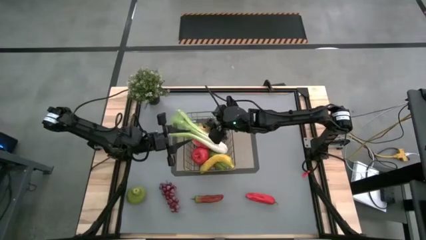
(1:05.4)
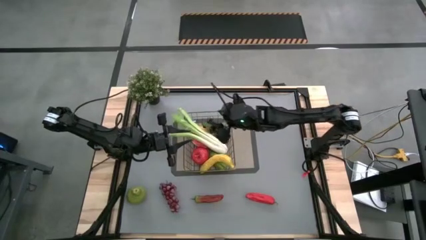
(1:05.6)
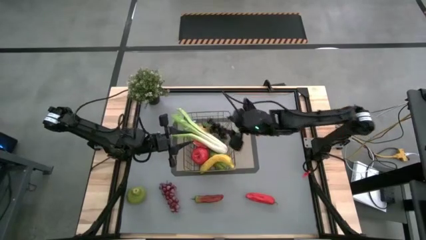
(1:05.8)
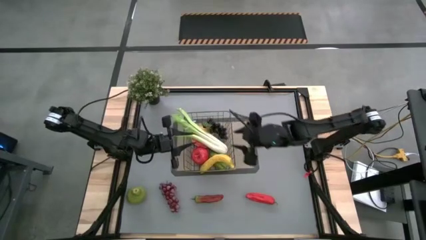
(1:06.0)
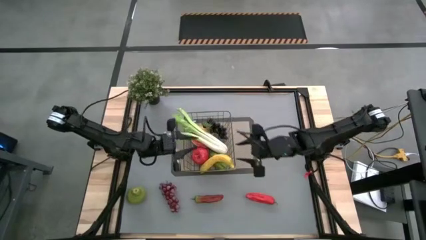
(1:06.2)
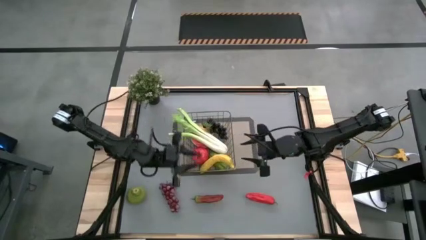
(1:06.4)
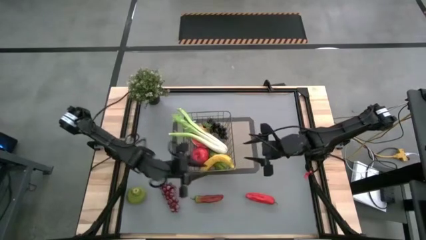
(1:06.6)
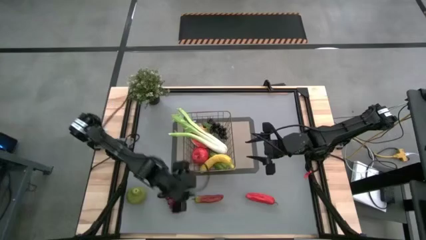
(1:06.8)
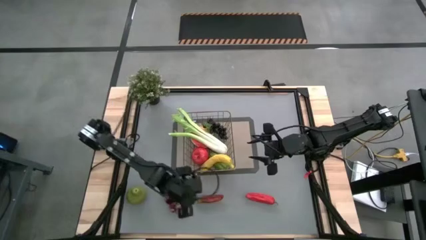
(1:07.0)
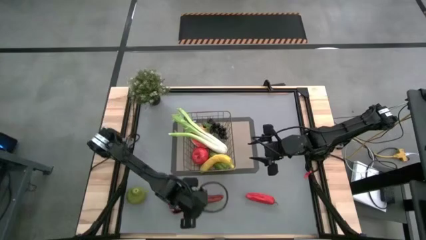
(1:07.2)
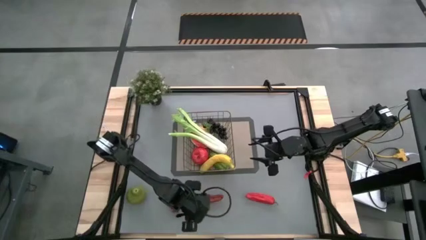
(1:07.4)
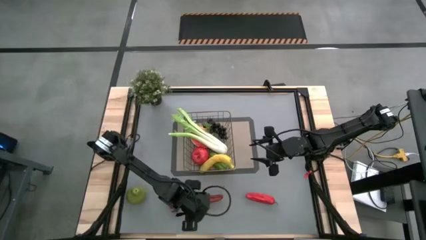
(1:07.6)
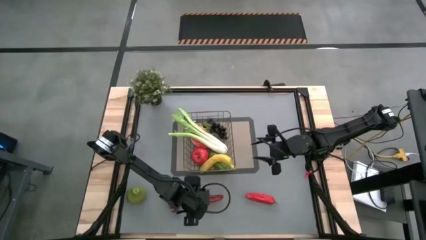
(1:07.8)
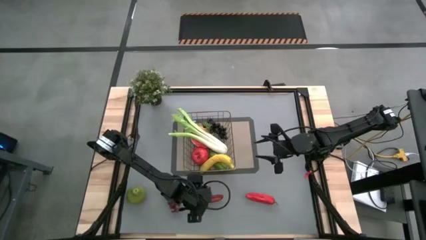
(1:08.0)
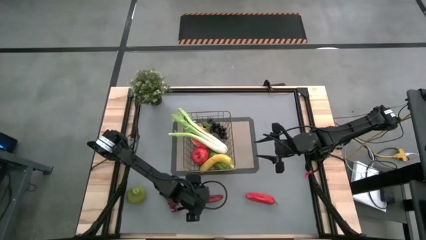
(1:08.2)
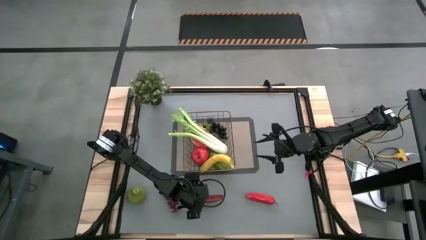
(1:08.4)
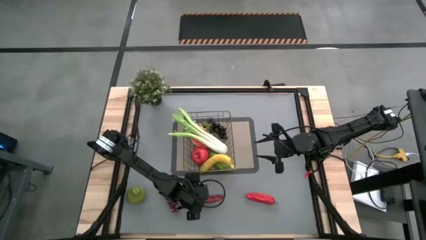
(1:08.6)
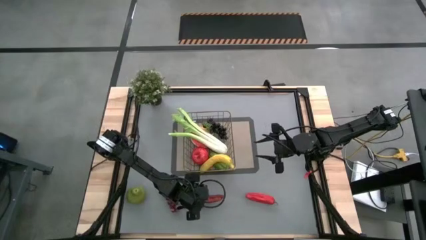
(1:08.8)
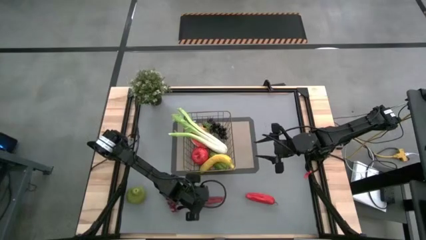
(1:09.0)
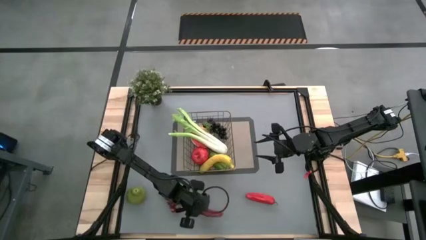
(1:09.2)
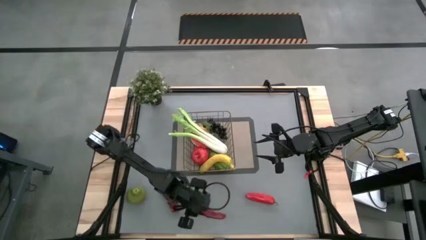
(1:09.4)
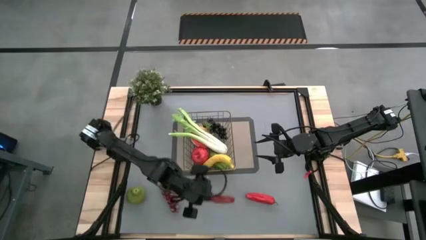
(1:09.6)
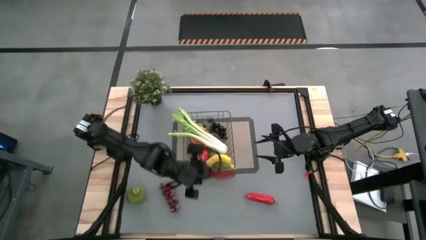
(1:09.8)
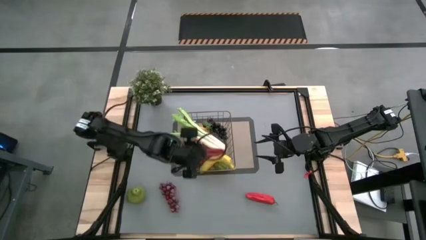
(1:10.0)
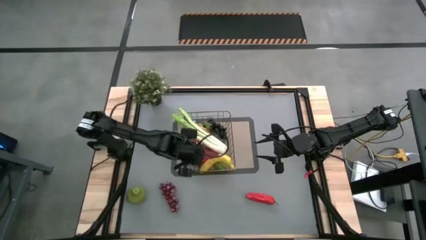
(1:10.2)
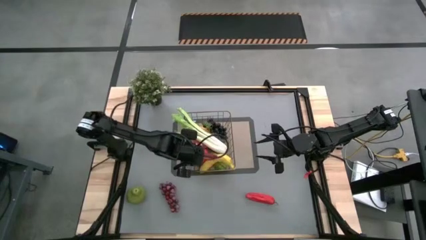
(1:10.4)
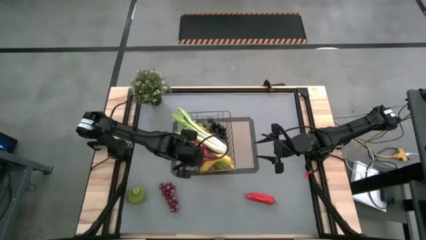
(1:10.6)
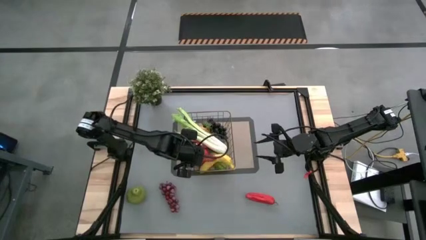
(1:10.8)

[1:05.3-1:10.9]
Task: Build produce basket
Put the dark red chili pepper into the wire basket

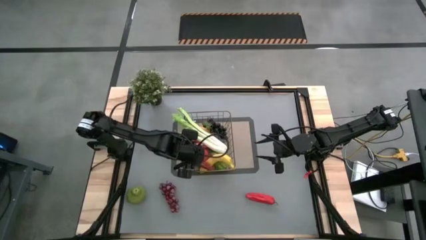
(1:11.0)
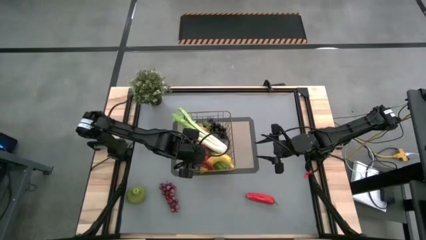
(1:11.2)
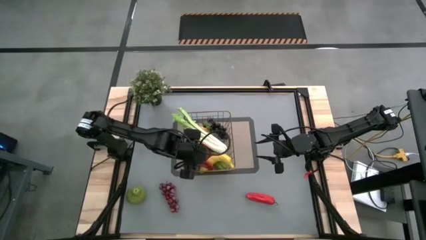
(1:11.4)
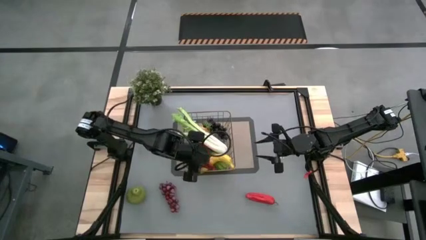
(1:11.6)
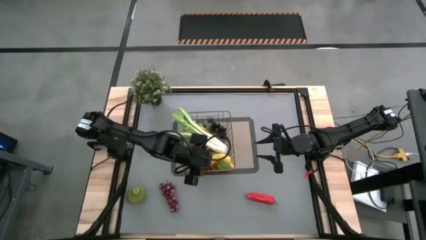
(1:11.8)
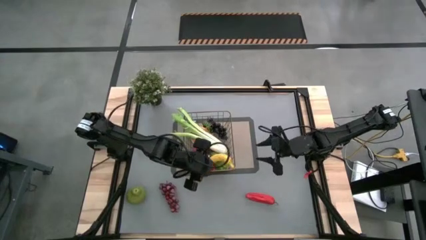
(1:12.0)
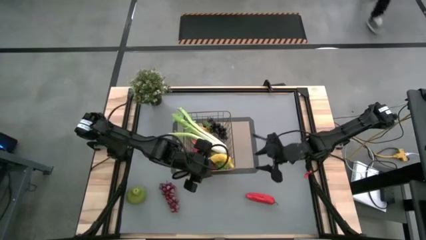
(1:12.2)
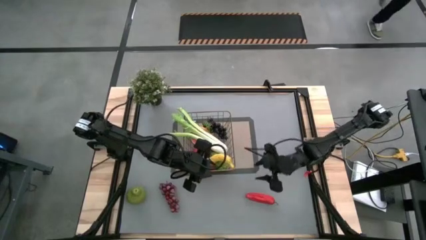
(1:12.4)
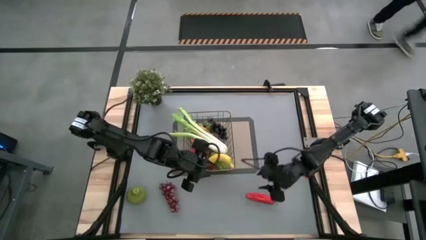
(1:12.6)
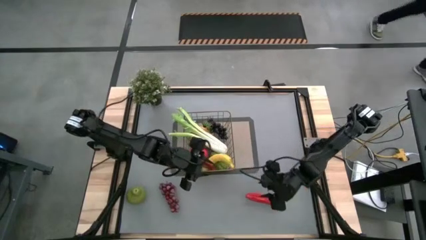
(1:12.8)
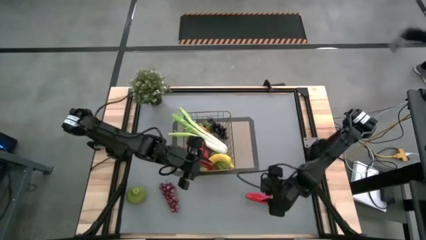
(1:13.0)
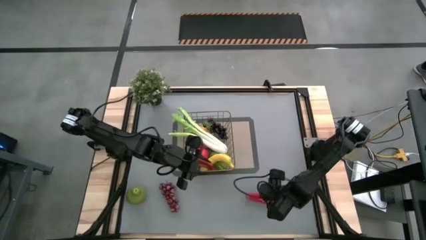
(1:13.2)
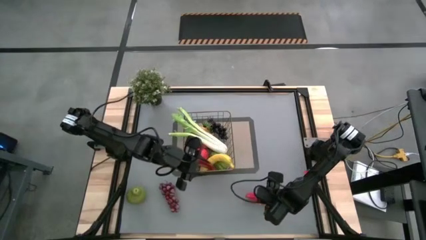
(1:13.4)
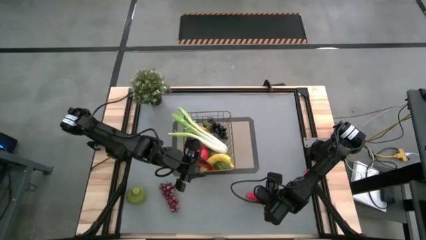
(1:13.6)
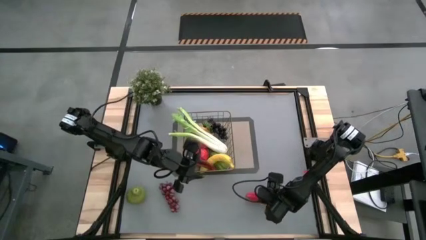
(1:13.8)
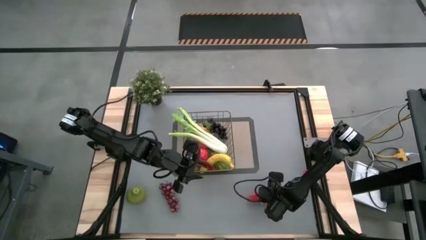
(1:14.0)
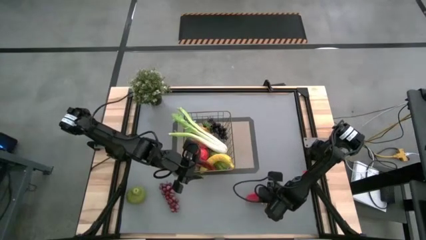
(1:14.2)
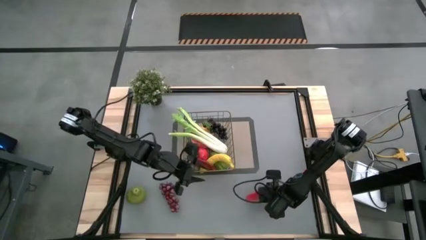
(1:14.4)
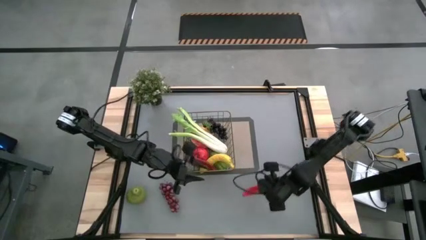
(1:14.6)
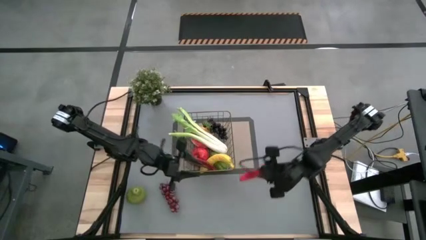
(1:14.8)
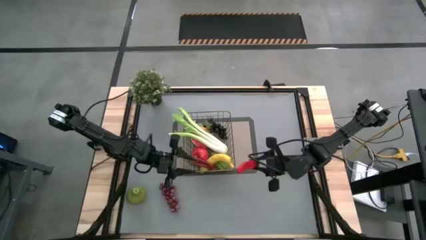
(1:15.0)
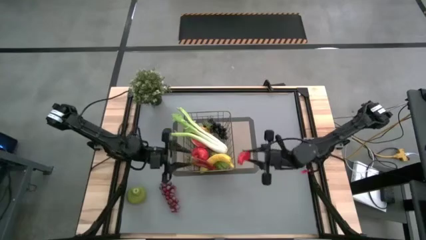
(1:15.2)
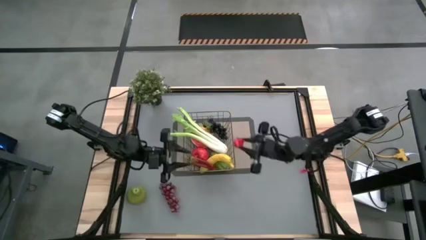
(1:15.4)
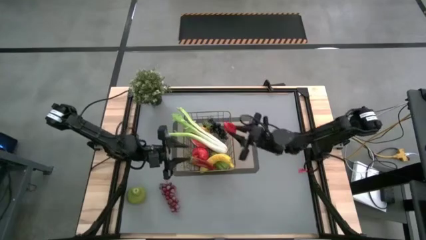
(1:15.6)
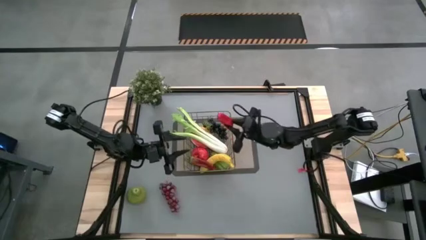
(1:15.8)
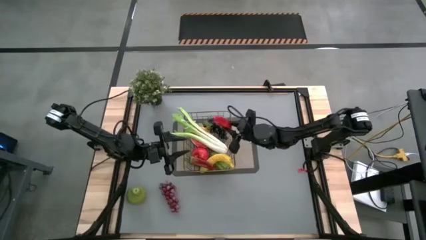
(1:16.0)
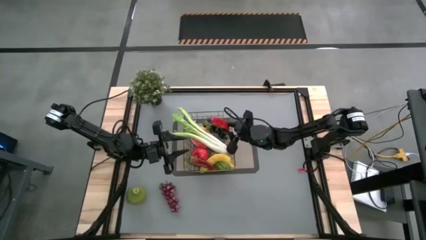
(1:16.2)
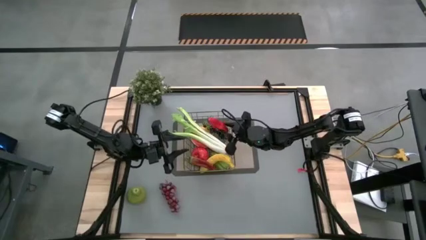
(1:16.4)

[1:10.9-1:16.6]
Put the red chili pepper into the wire basket

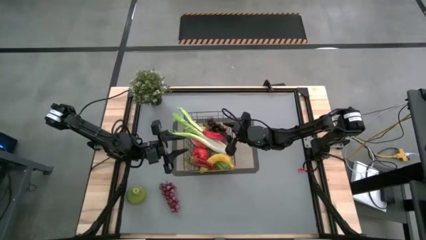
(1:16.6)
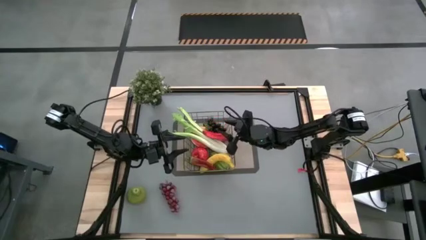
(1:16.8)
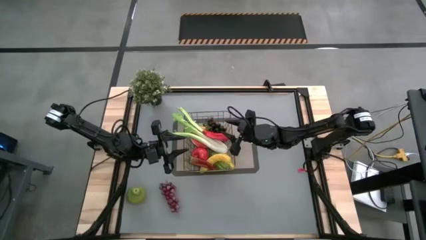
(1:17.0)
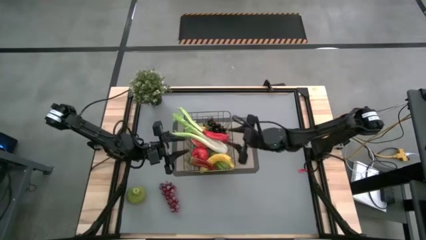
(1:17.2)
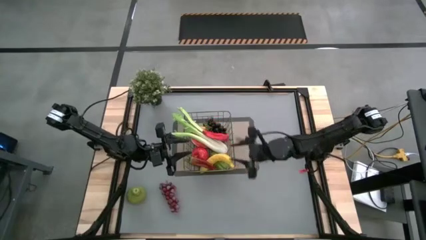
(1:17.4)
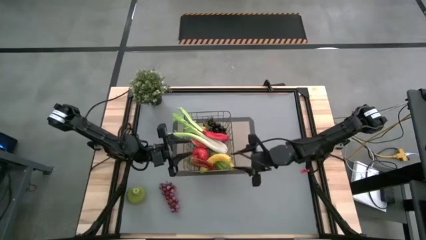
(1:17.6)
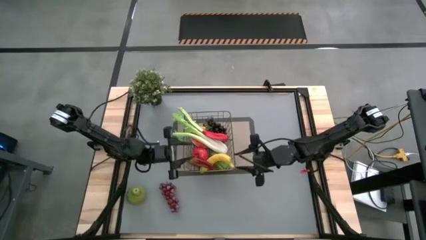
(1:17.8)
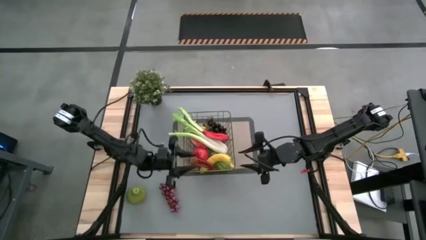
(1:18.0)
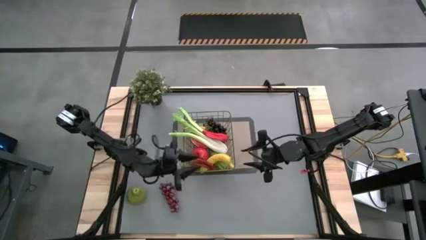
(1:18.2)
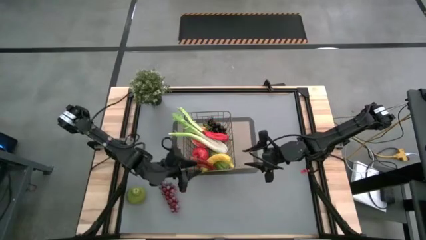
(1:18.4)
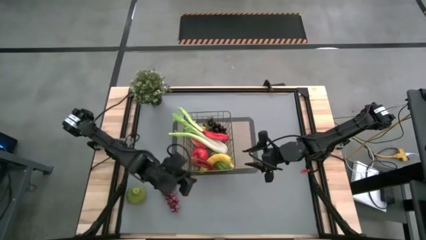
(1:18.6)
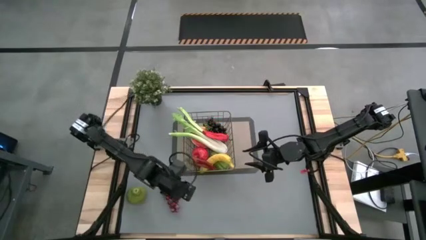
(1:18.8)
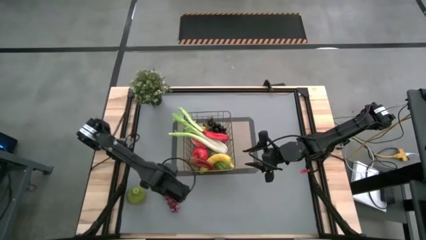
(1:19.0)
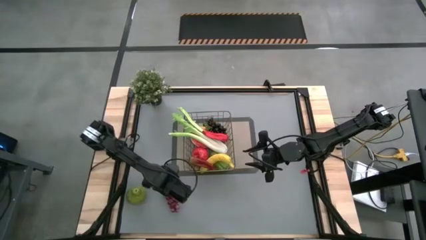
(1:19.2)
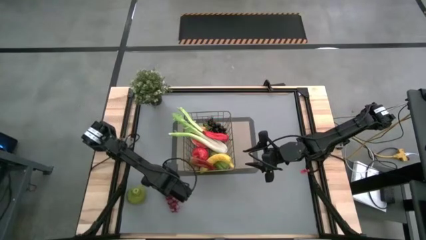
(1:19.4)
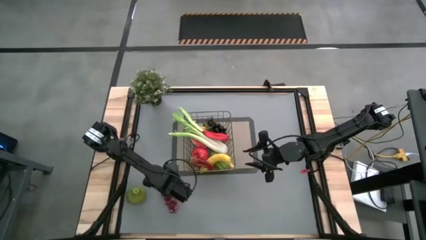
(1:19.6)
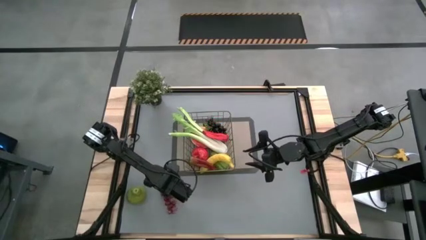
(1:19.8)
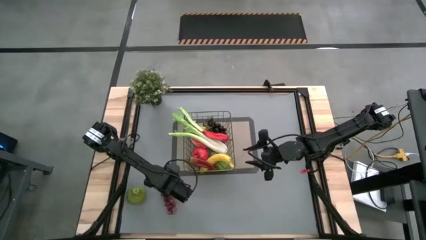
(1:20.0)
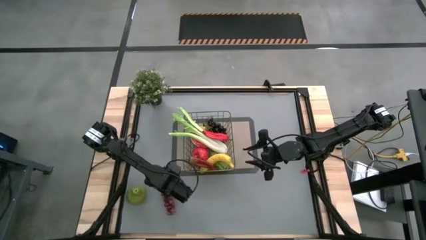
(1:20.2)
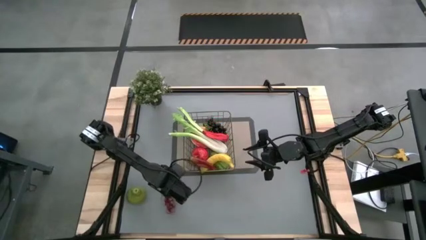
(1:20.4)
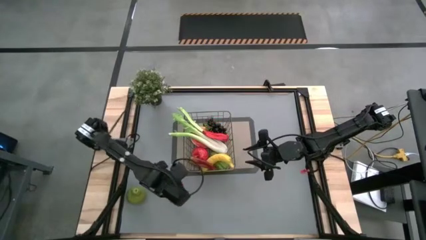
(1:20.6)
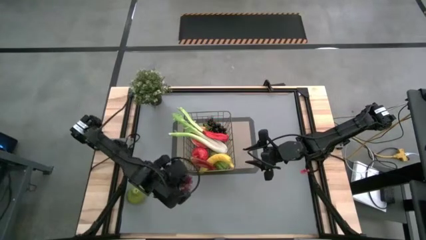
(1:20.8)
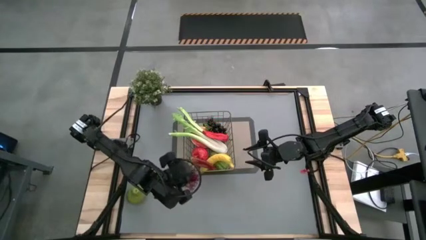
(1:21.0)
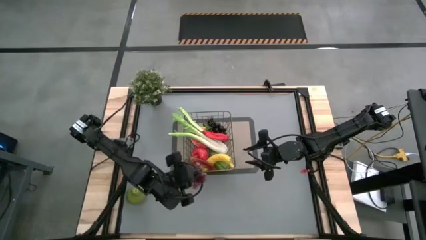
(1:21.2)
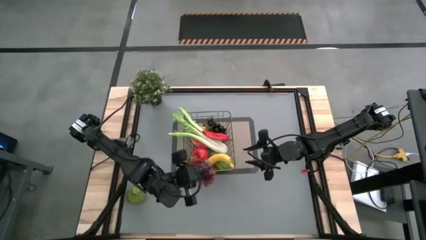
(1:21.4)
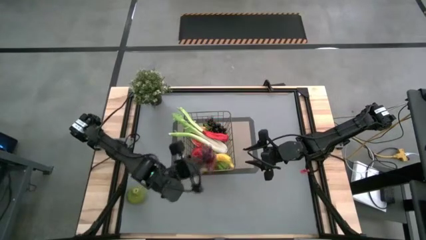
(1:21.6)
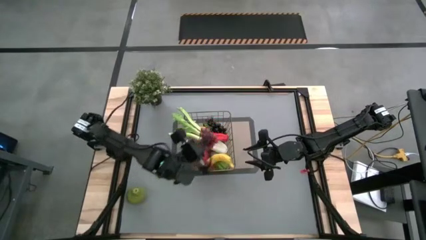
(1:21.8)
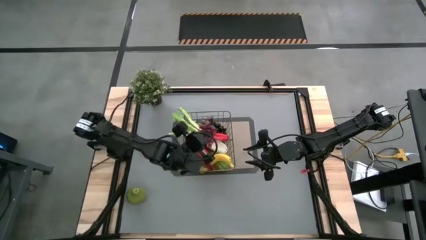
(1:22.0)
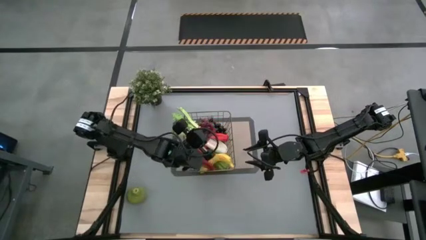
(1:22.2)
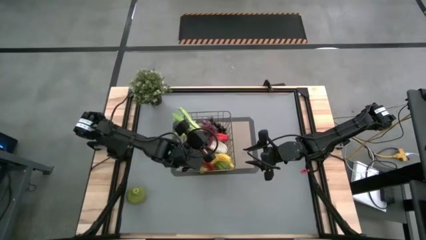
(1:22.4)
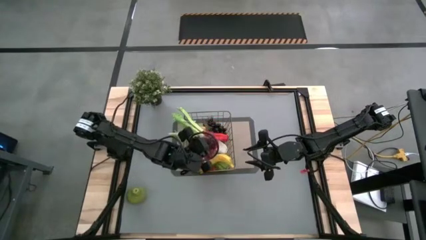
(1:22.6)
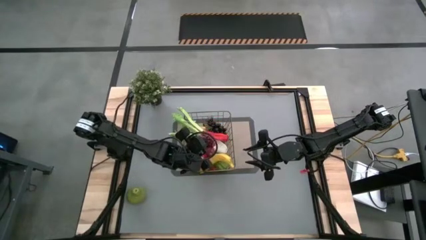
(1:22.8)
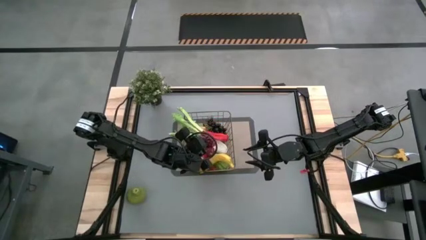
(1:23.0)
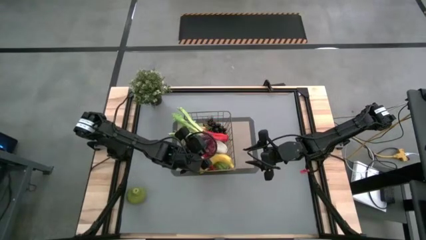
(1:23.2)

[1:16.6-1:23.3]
Put the red grapes into the wire basket
